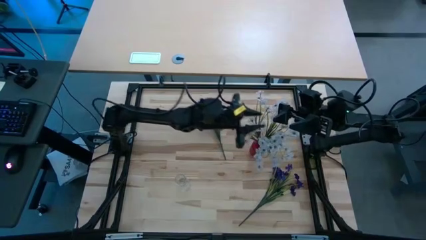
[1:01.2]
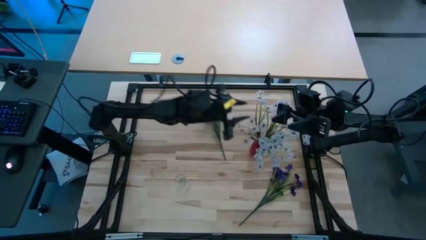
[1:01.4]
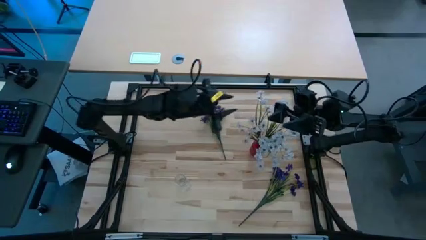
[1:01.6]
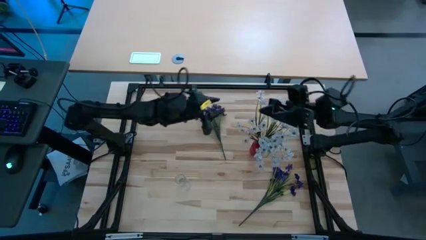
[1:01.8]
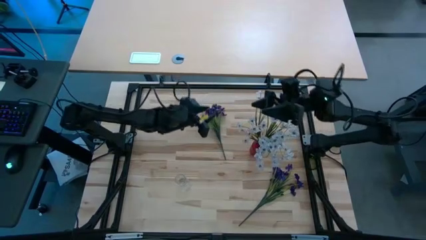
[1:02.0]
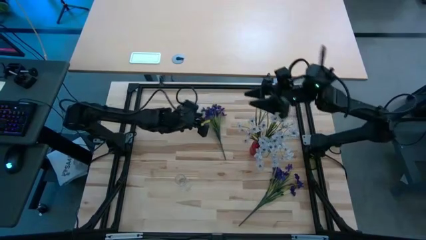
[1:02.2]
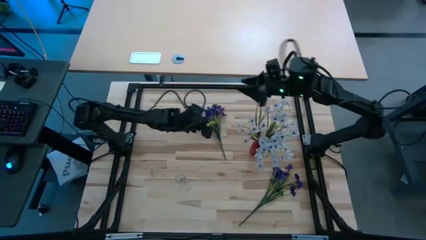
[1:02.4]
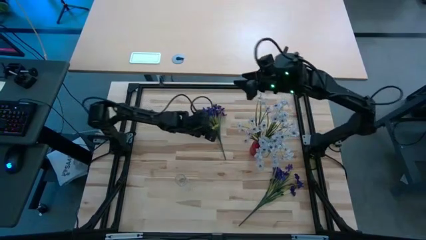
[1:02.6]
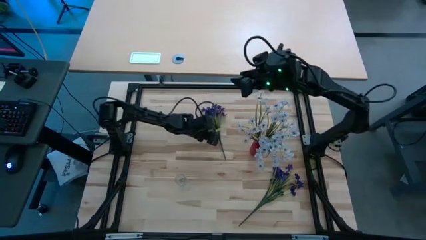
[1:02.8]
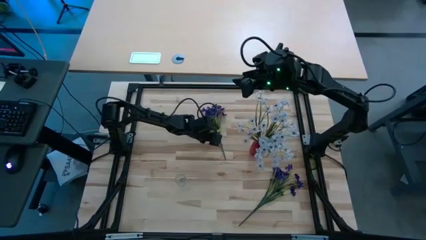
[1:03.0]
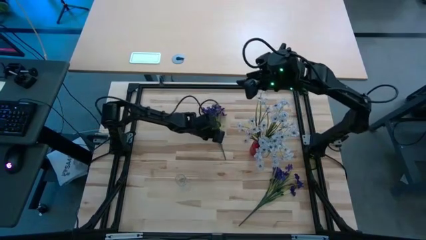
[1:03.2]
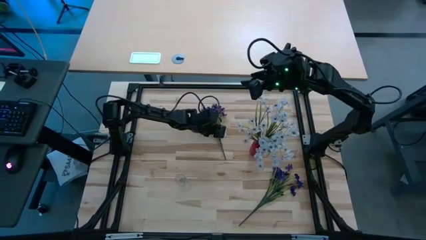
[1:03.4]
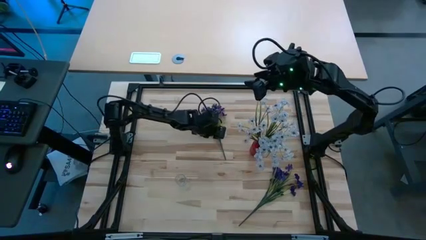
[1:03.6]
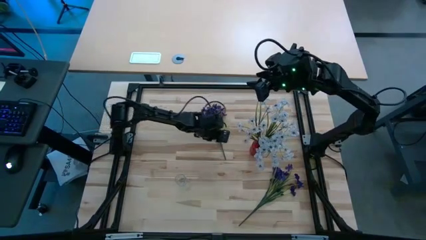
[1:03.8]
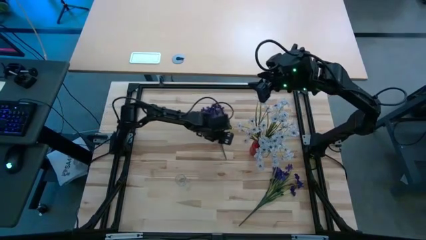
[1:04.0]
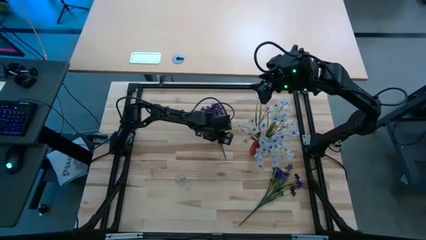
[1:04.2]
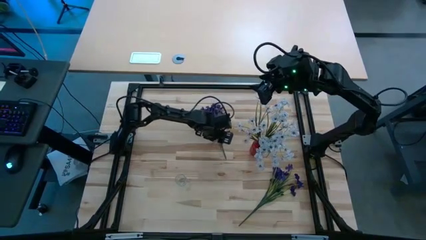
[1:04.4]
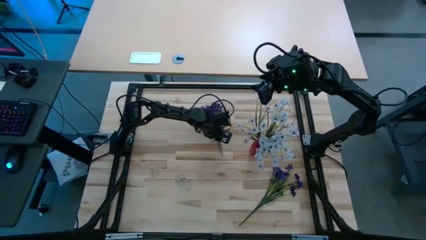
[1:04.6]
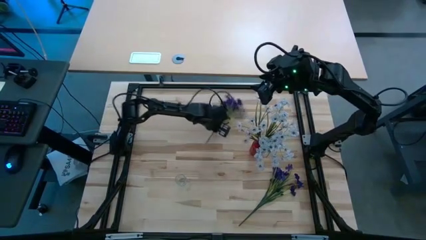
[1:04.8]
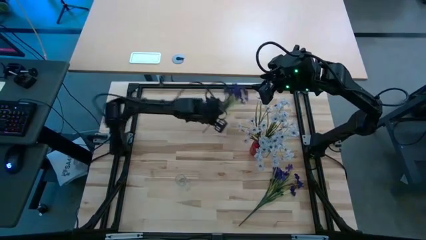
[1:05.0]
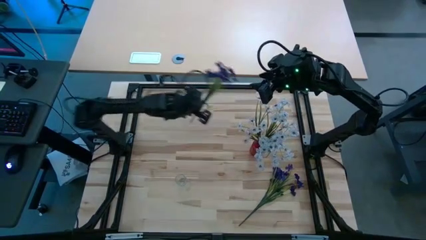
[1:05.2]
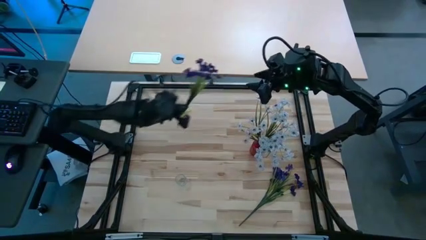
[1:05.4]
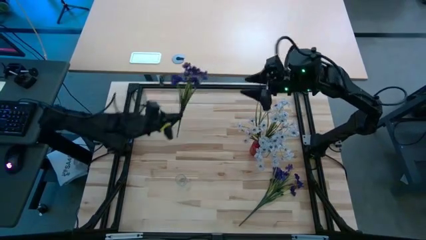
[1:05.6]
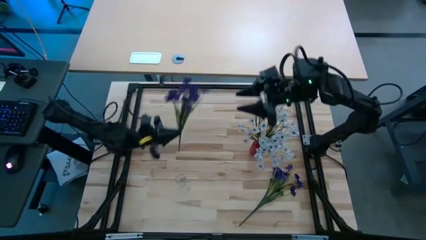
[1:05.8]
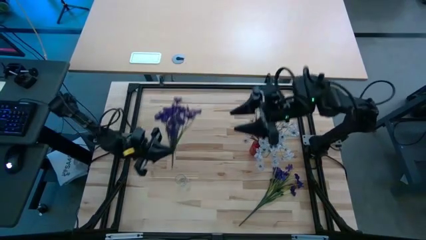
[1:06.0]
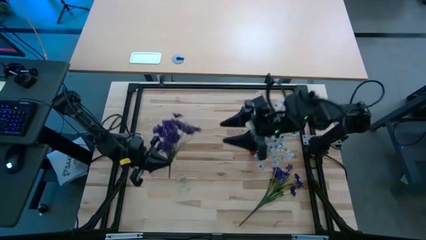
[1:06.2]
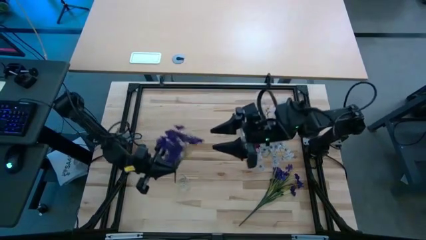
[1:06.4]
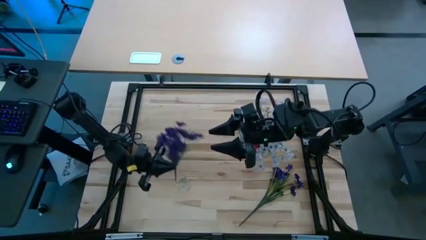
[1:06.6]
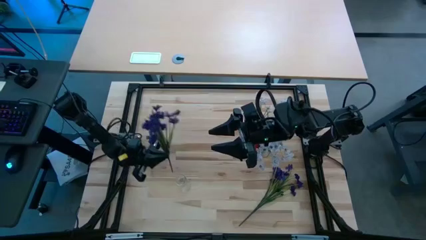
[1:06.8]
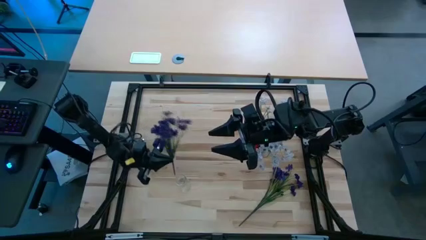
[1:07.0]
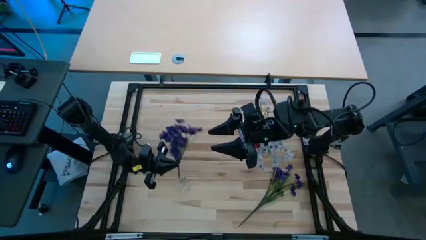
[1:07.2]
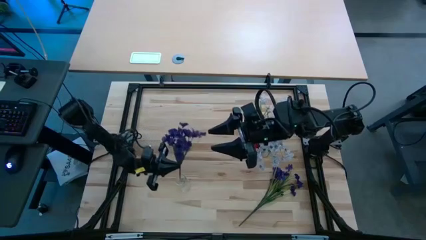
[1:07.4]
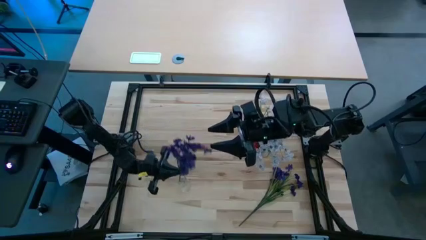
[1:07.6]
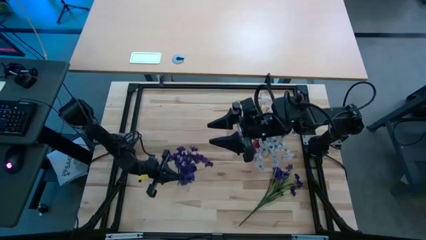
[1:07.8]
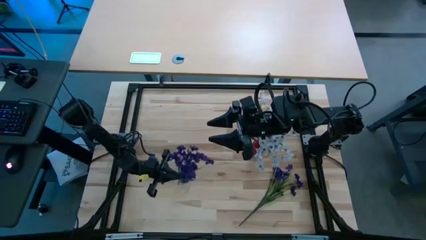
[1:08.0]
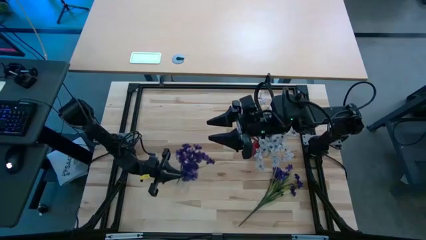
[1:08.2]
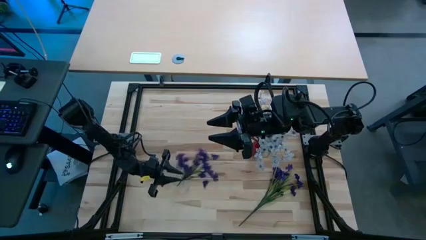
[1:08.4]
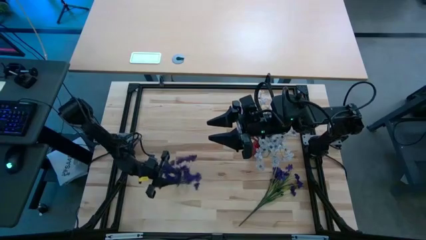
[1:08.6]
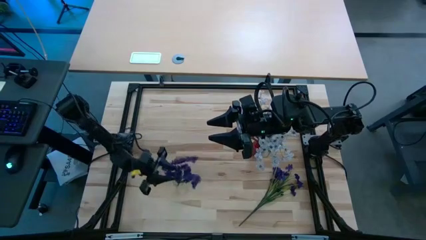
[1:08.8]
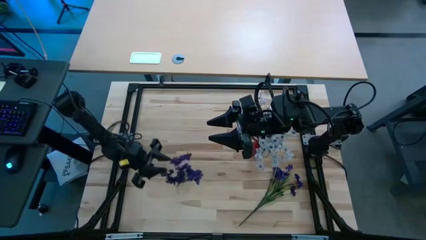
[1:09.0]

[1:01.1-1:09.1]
Task: Sort flowers into vase by color
Put the top violet flowers into the transparent vase

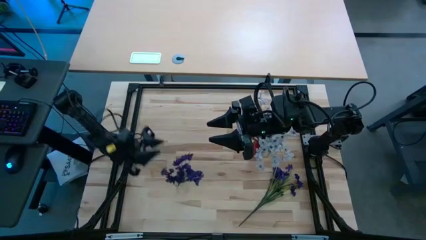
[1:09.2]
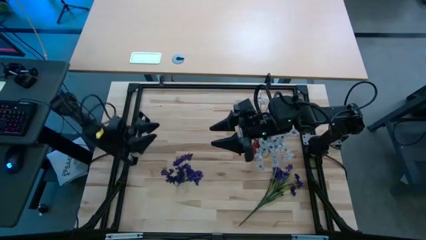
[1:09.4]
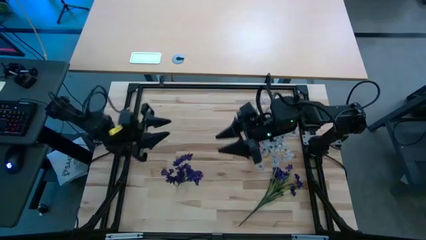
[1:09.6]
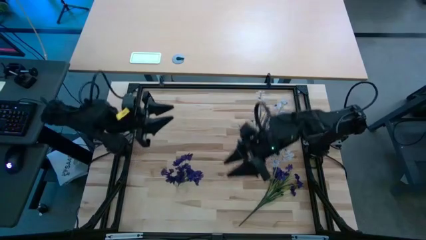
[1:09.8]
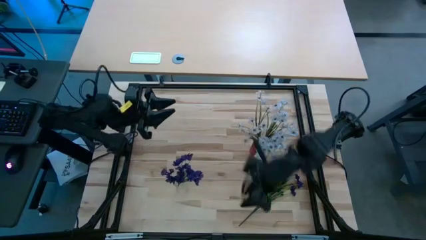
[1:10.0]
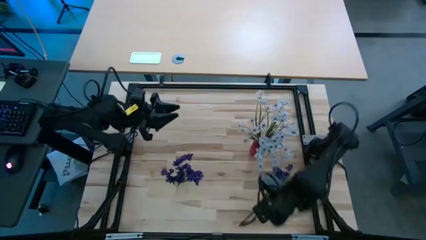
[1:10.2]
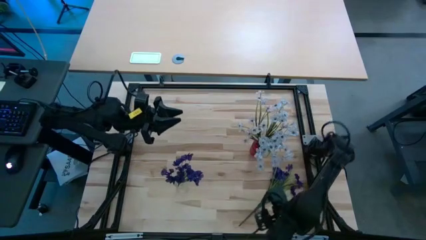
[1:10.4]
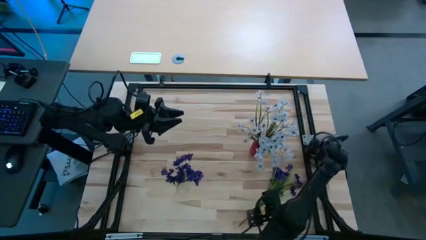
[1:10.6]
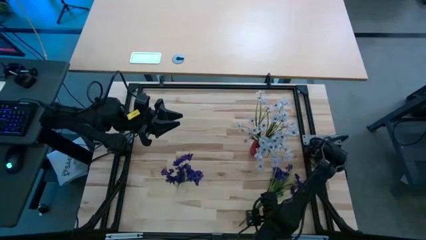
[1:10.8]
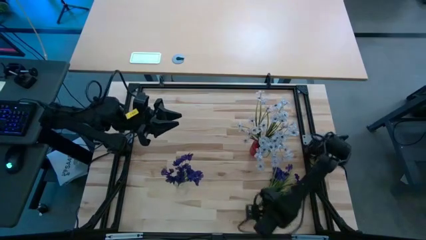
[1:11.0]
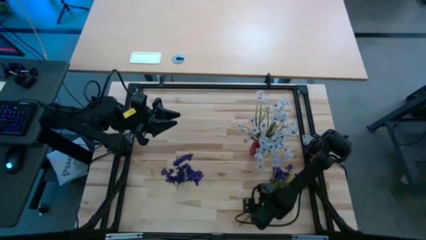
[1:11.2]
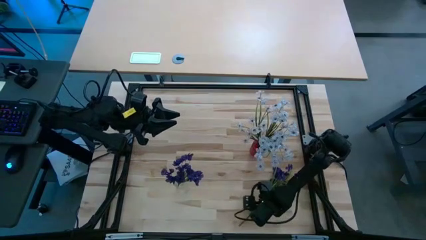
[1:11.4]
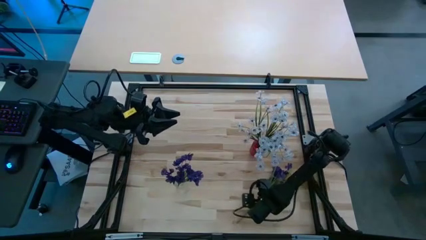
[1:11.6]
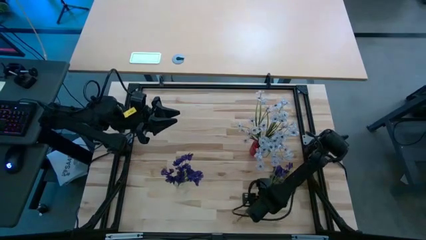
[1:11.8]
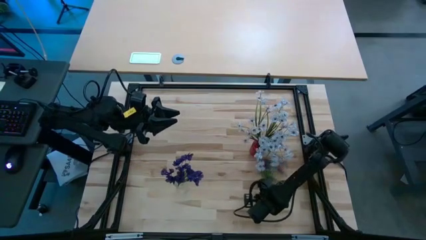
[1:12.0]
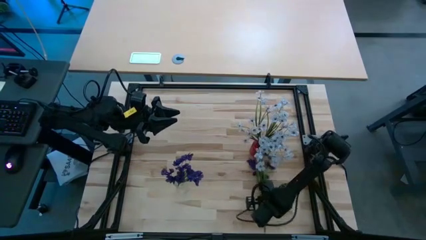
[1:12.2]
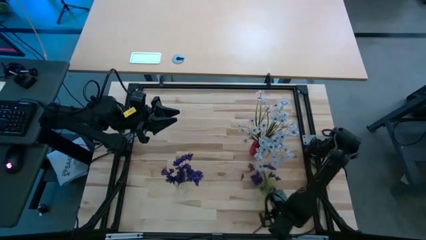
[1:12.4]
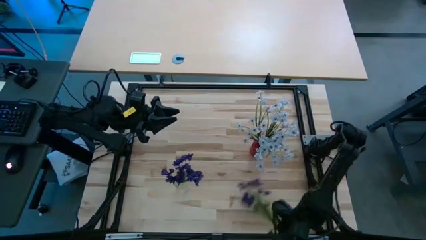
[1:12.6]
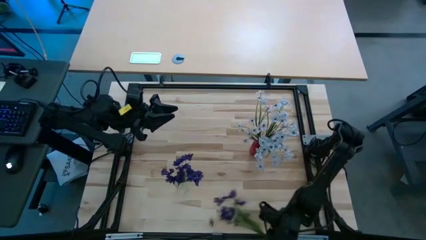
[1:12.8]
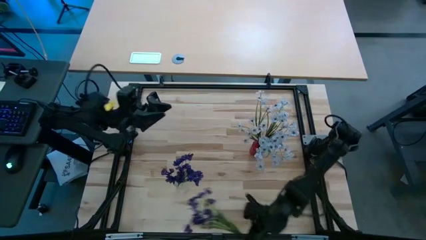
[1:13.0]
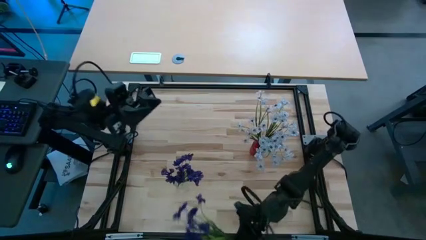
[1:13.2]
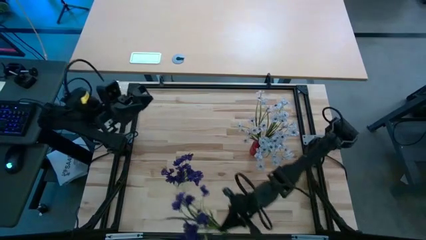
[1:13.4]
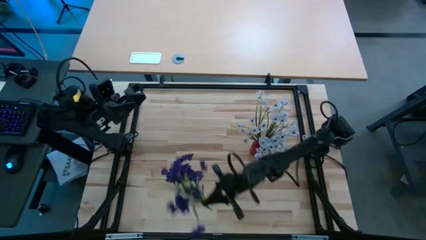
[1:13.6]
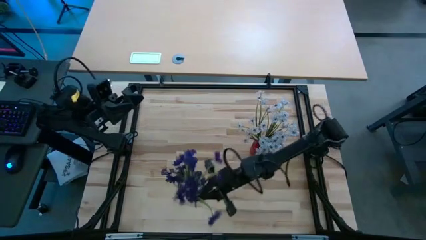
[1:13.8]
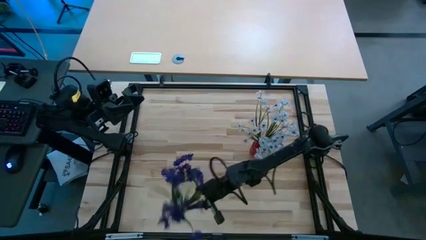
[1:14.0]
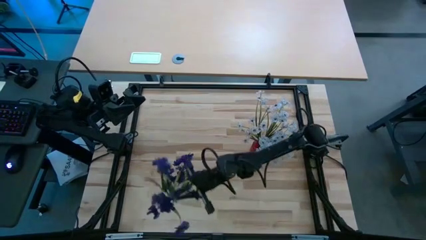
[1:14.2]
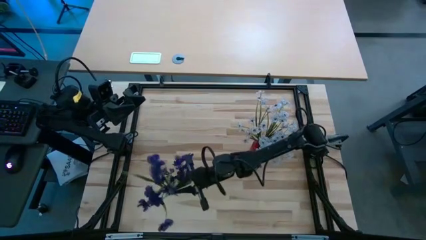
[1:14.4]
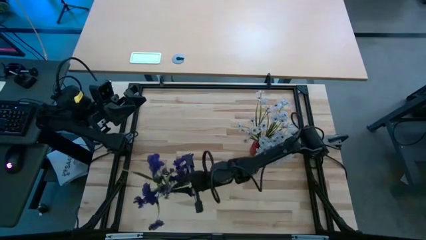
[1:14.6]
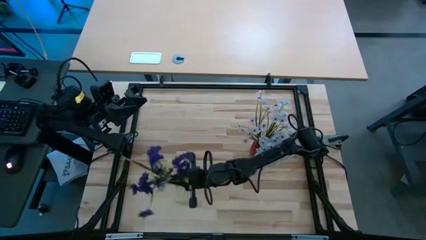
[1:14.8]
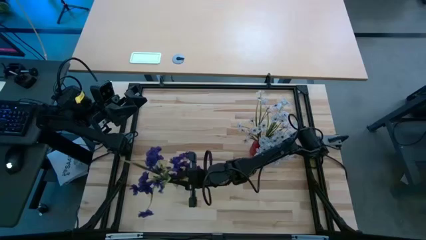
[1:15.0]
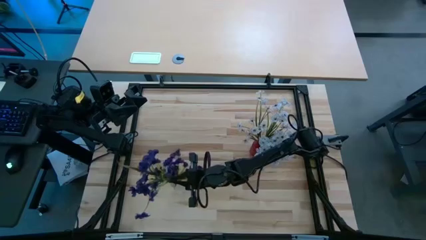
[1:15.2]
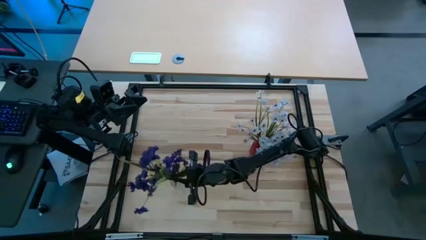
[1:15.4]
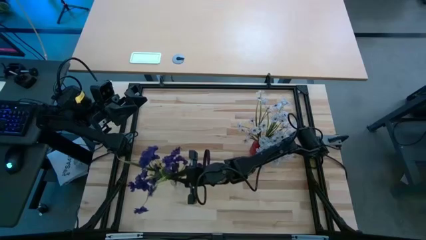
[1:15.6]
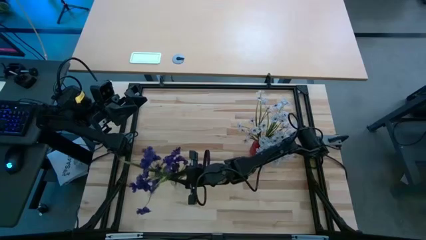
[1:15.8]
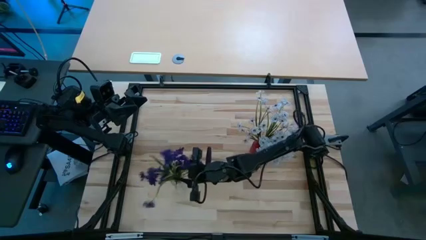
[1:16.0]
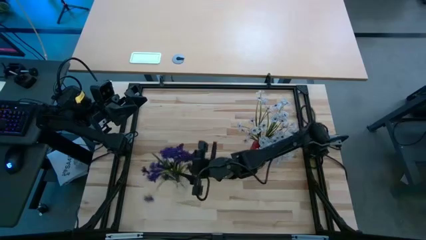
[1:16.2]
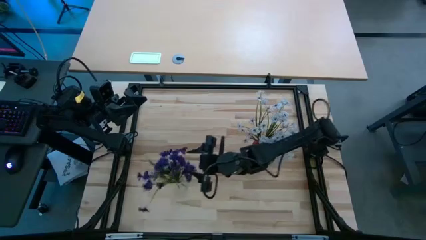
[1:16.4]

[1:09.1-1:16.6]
Put the violet flowers into the transparent vase

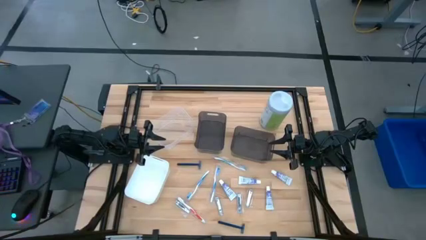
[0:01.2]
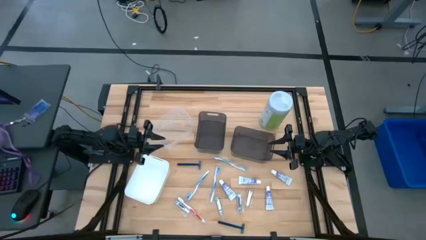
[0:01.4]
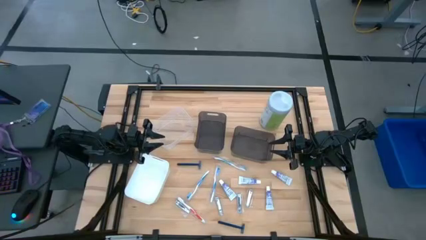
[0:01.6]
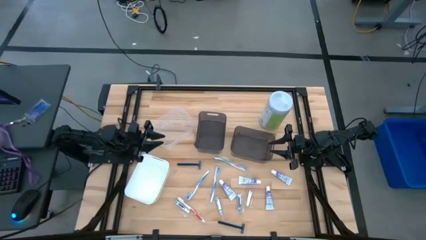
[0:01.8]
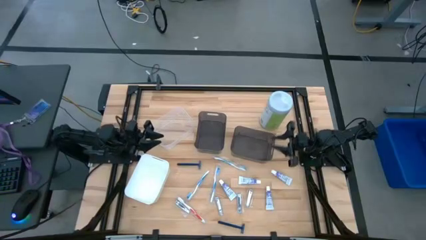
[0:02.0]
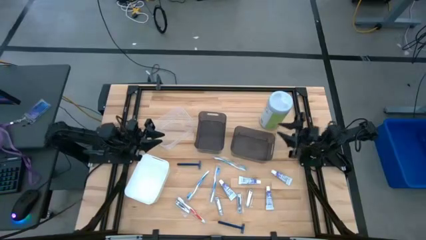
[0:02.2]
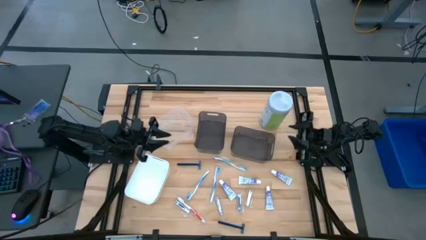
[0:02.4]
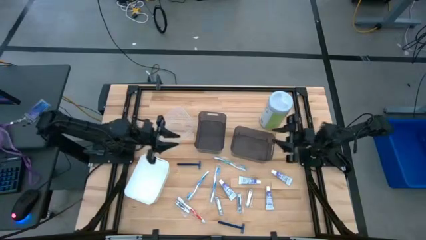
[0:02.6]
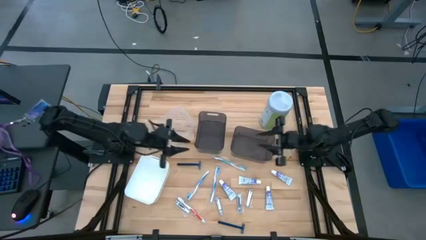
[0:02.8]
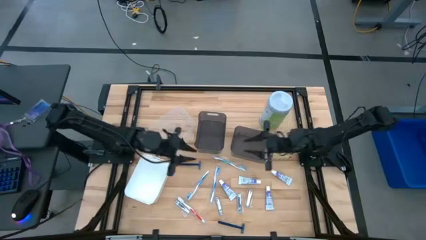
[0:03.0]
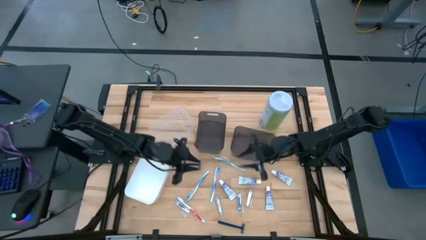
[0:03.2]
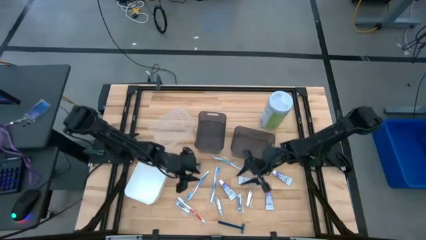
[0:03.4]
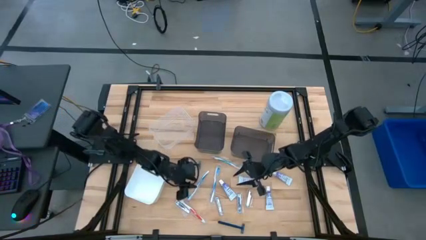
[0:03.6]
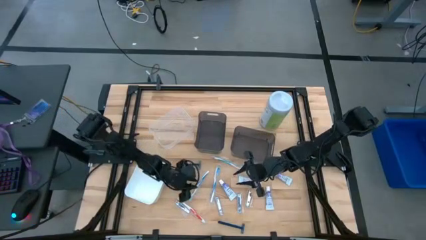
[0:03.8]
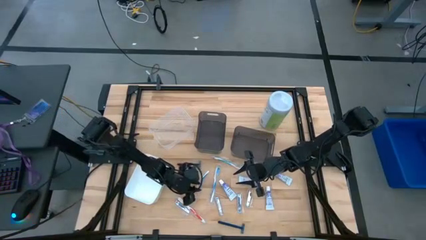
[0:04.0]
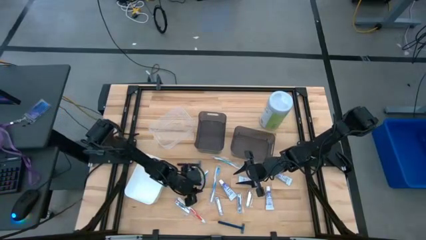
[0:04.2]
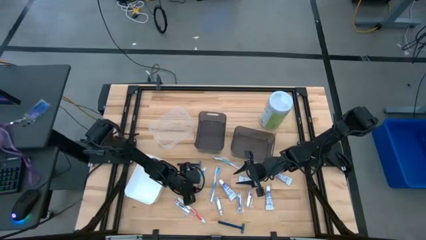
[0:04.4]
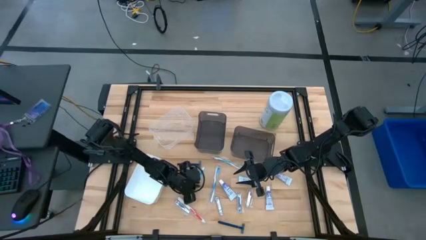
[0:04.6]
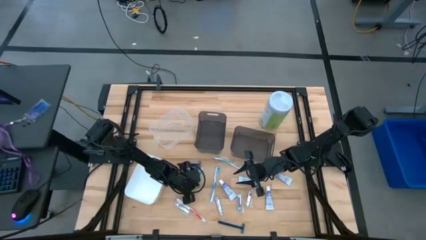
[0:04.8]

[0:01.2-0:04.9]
Task: Pick & Place Travel size toiletries
Put the blue toothbrush into the left black bin
